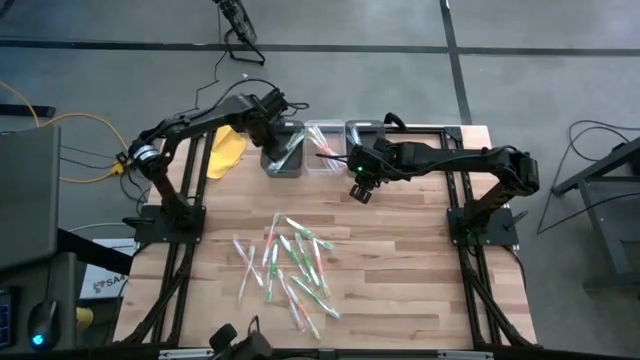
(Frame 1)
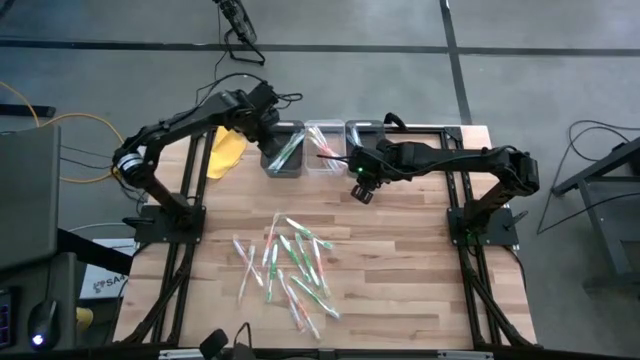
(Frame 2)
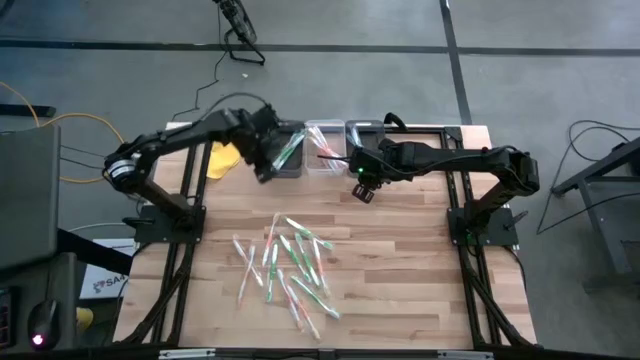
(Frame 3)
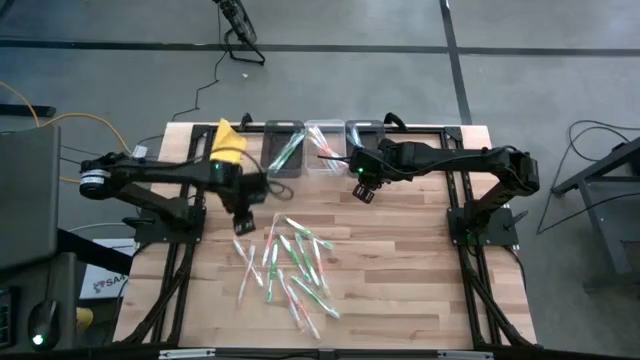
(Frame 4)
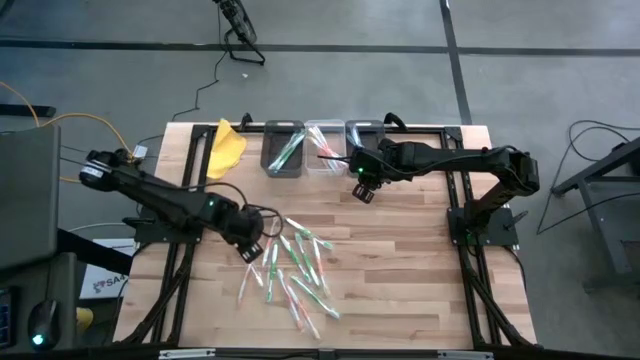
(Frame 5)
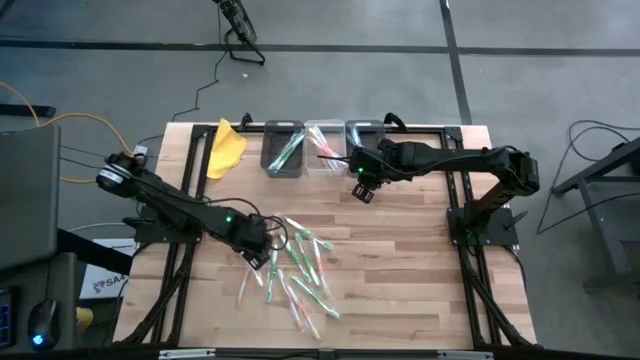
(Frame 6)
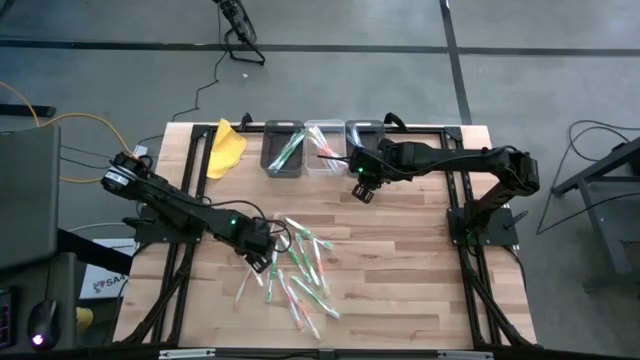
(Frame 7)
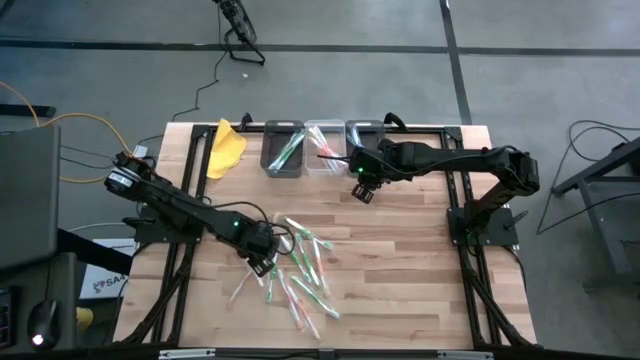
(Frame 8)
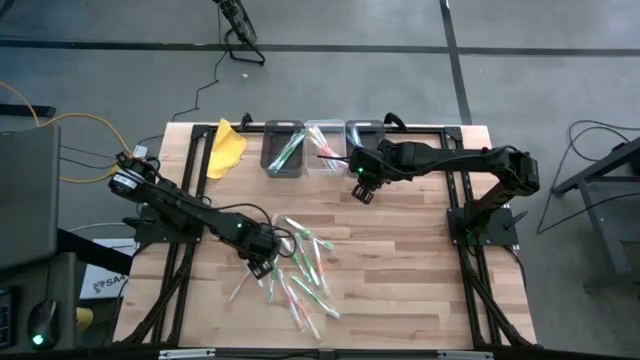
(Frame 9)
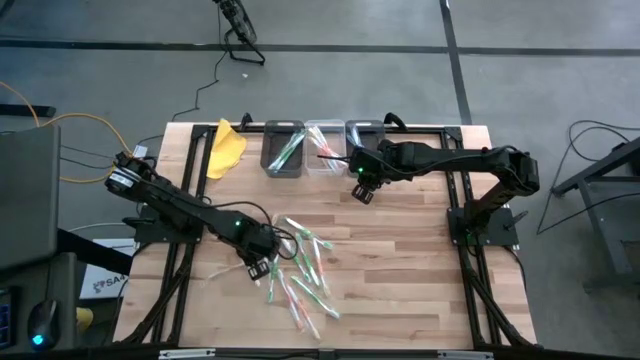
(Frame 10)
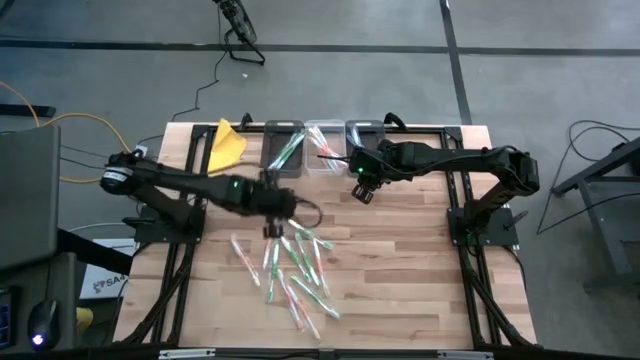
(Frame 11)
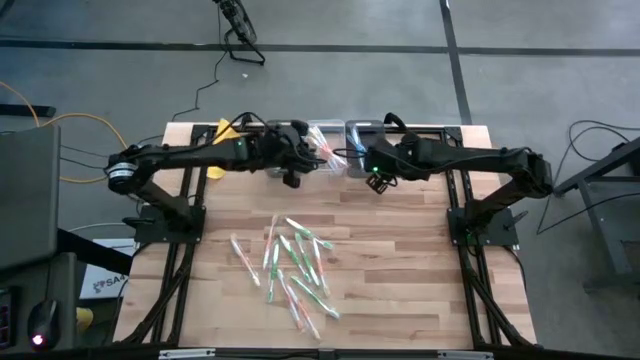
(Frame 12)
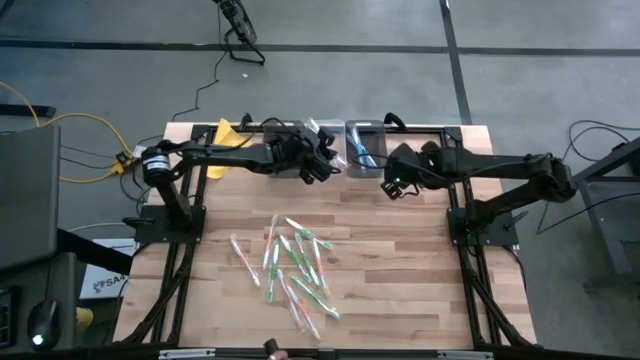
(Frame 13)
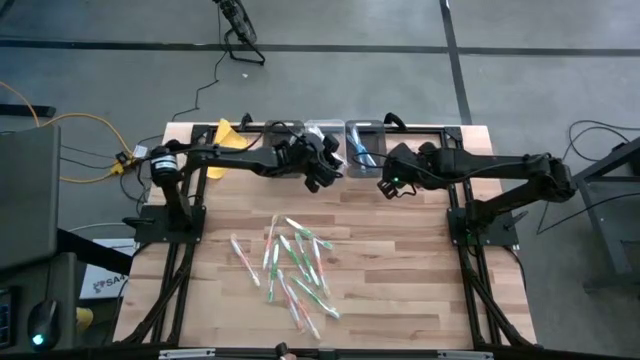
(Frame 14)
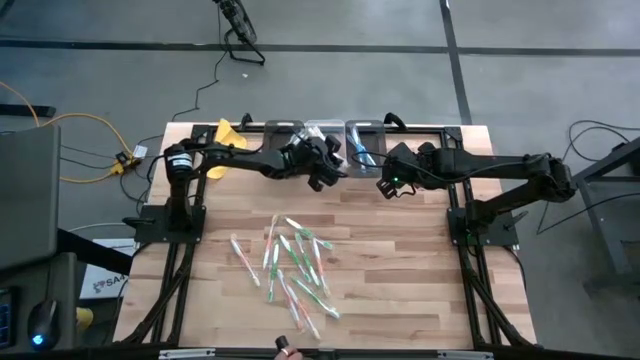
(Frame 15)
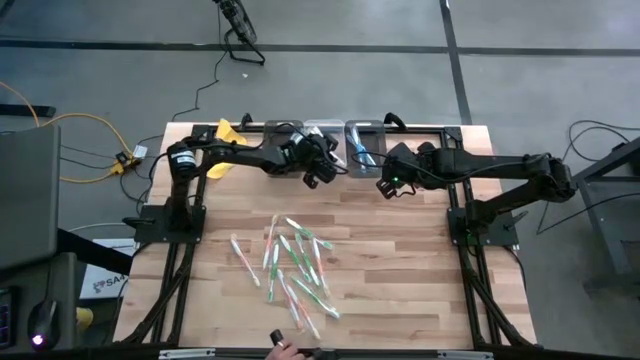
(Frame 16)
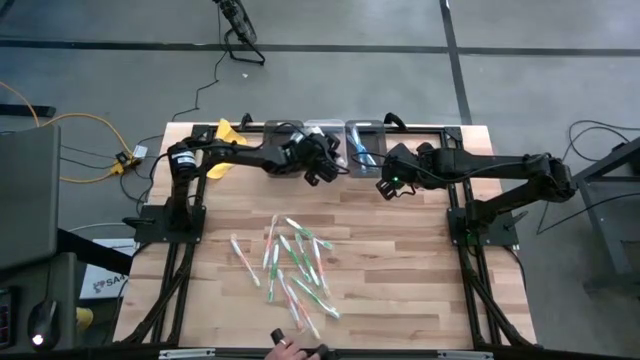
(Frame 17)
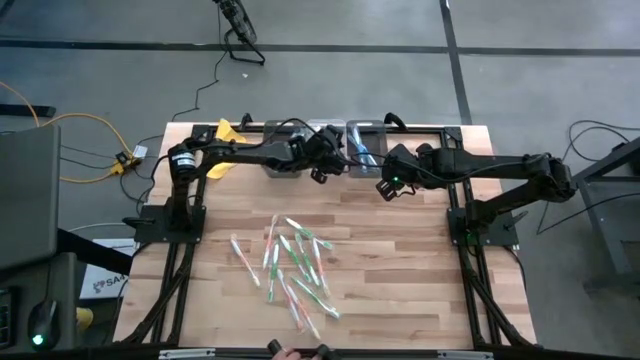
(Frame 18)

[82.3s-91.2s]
Task: Pick & Place Toothbrushes
Put the orange toothbrush into the transparent bin

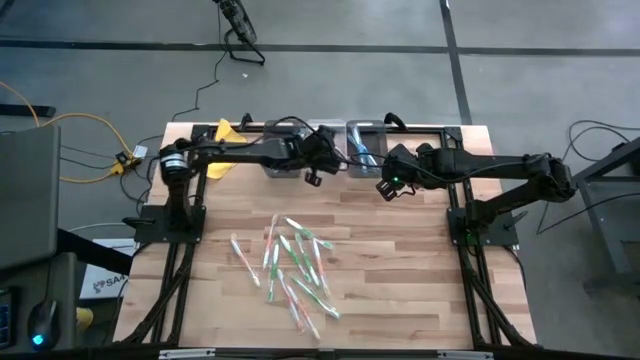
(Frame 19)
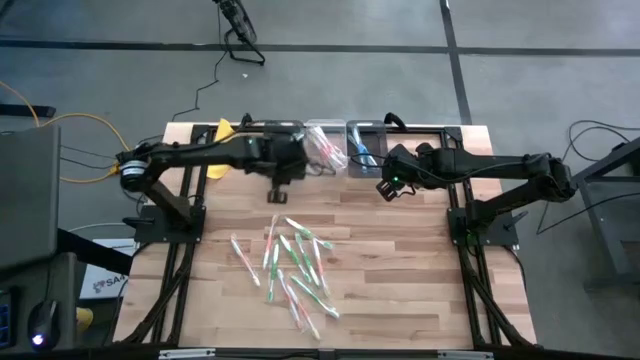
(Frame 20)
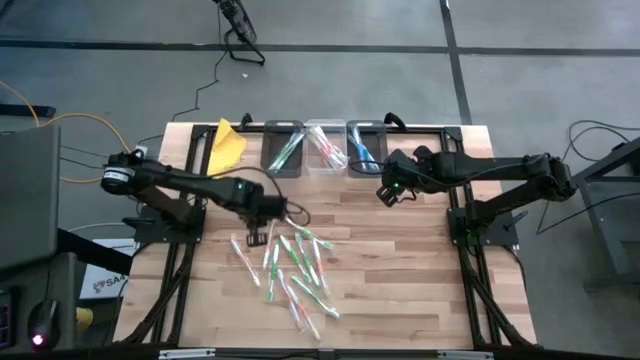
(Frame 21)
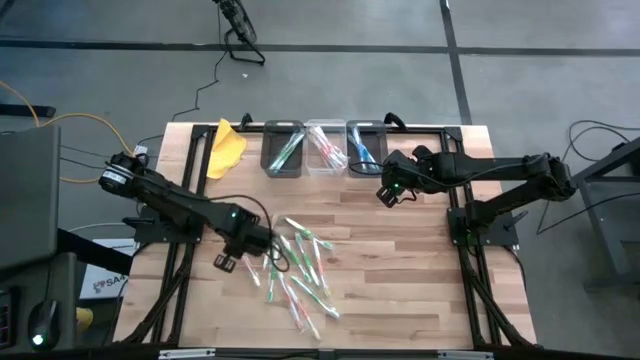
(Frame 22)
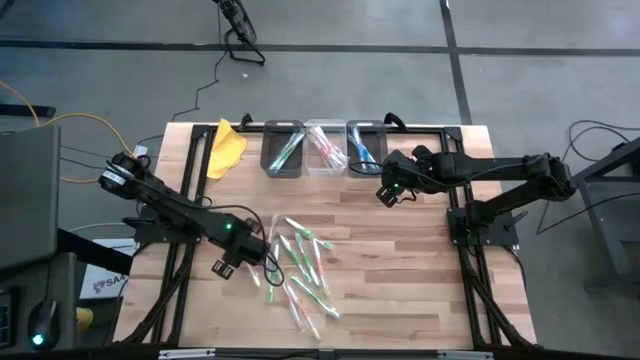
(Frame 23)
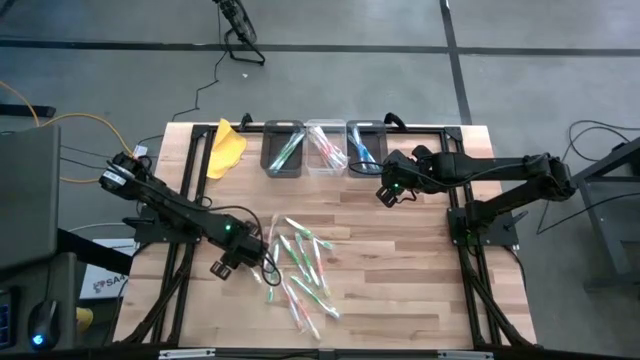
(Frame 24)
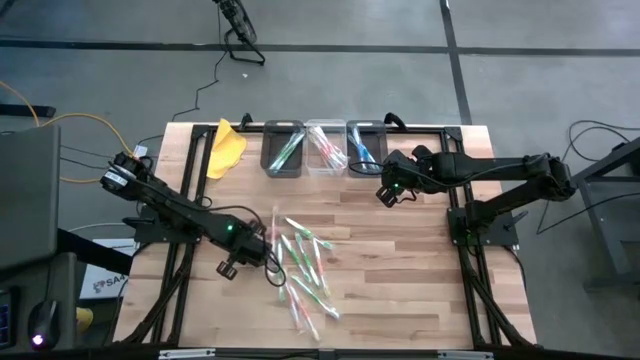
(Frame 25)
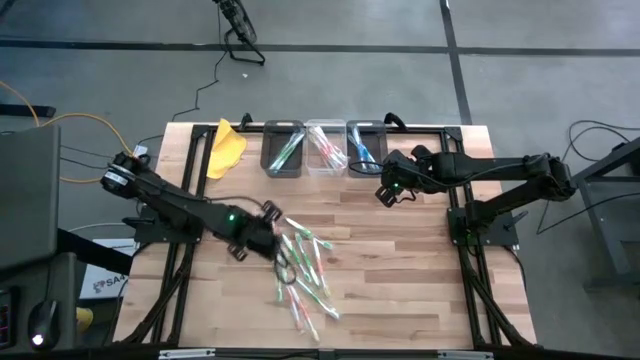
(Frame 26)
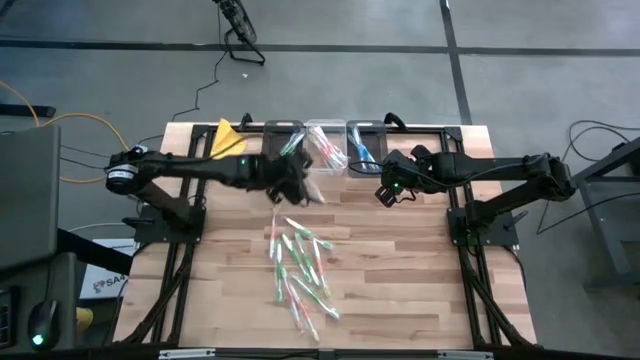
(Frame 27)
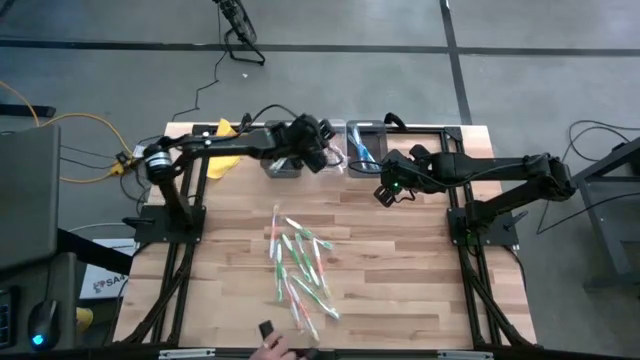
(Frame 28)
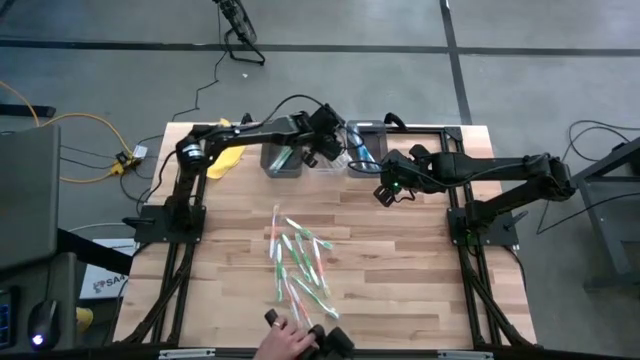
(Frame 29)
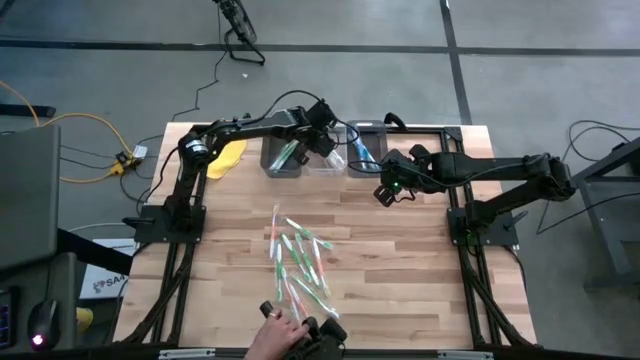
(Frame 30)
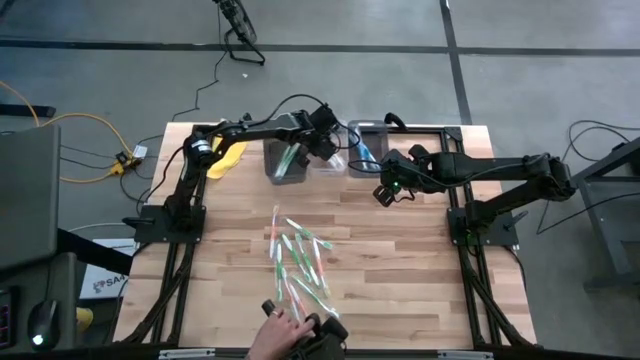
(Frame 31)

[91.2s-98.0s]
Put the orange toothbrush into the transparent bin

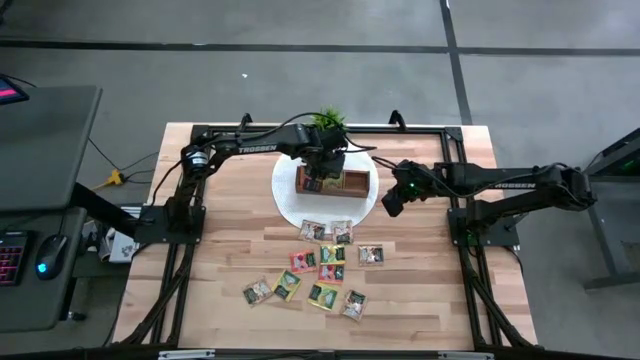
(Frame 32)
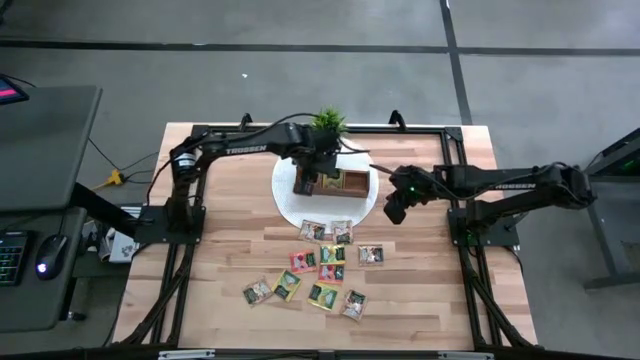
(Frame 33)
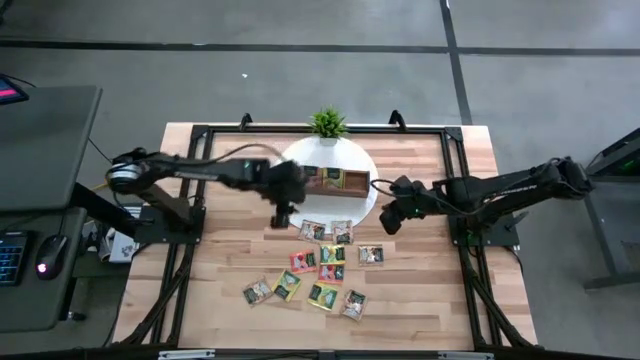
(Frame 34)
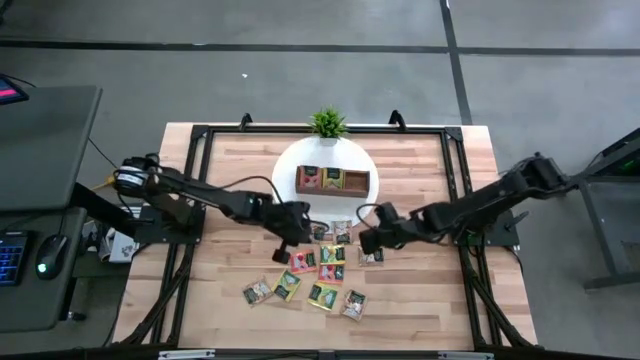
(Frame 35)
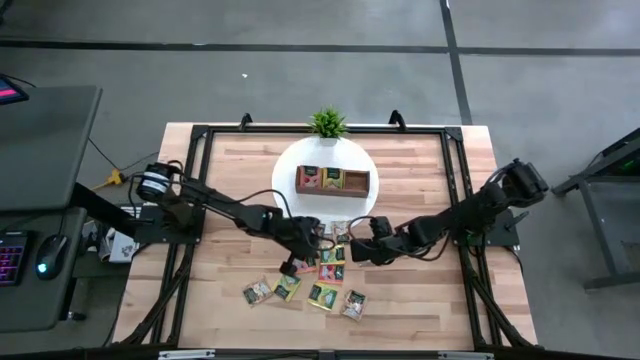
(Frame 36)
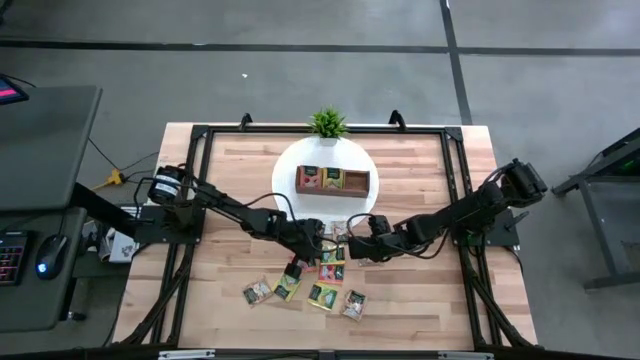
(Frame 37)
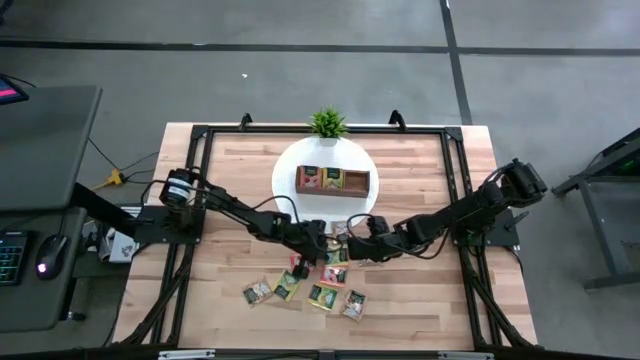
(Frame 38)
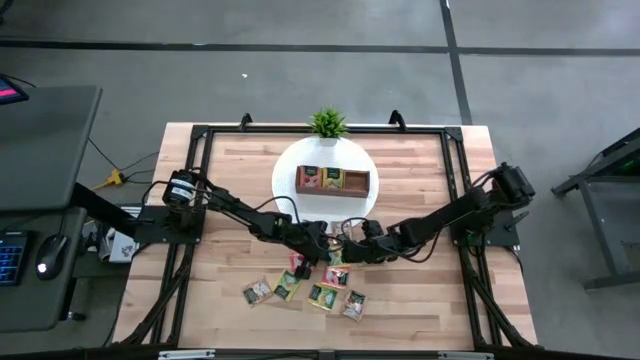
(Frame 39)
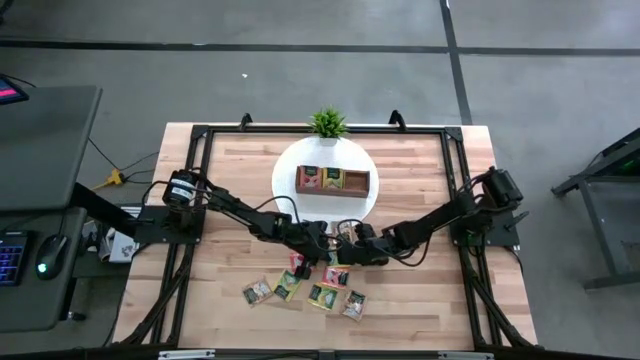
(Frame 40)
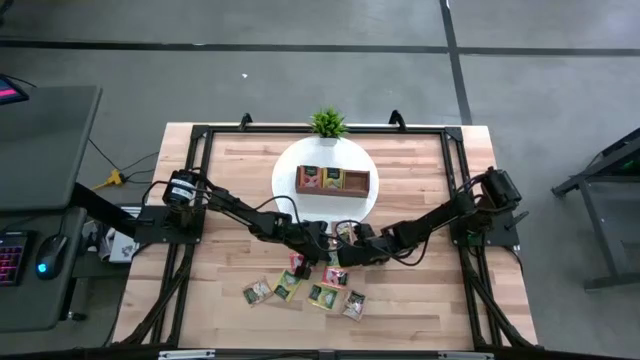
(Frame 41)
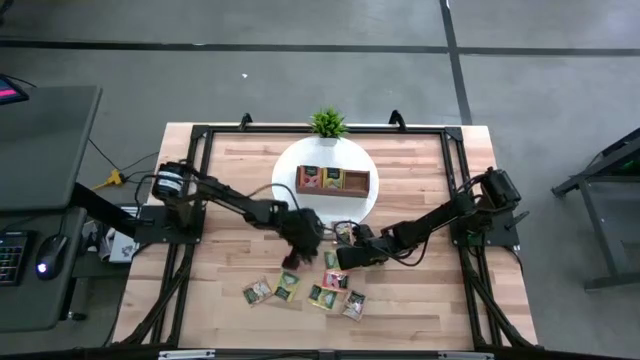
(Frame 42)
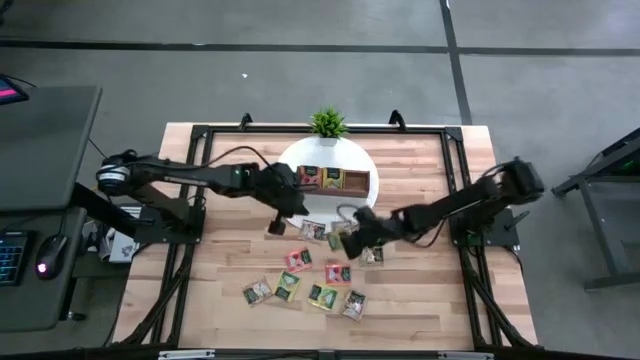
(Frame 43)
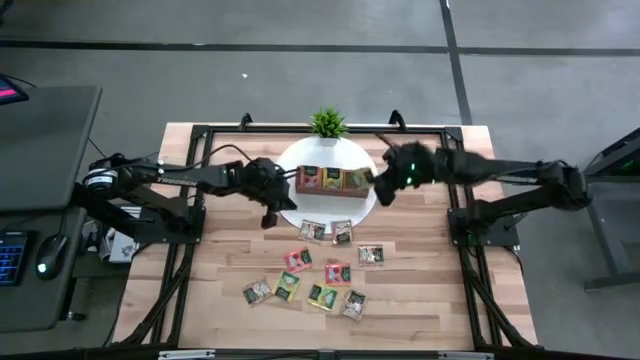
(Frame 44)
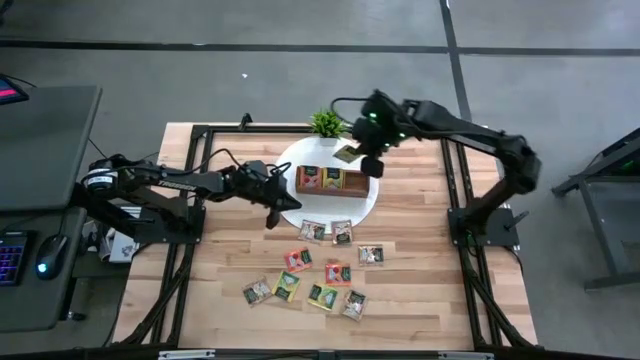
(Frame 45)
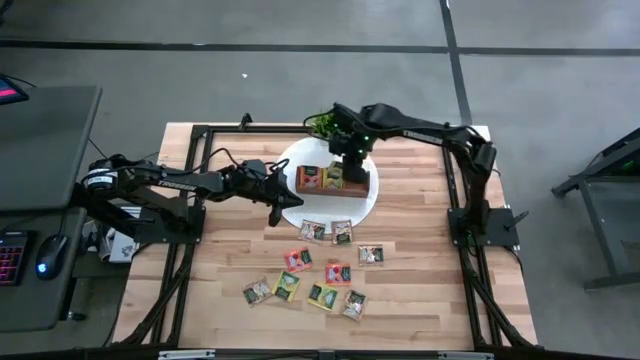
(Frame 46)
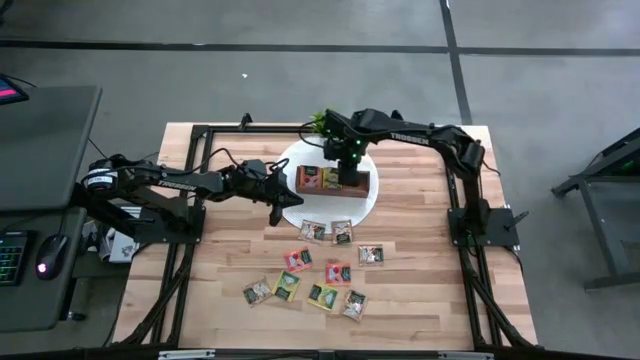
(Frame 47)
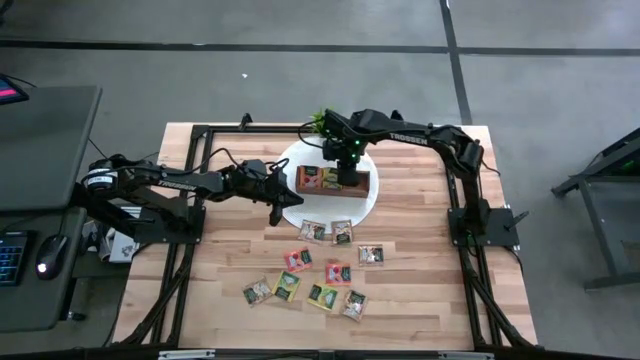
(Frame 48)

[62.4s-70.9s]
Task: Pick & Place Tea
Put the yellow tea bag into the middle section of the wooden organizer
